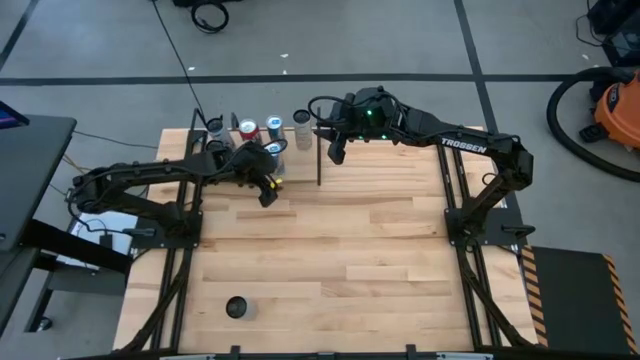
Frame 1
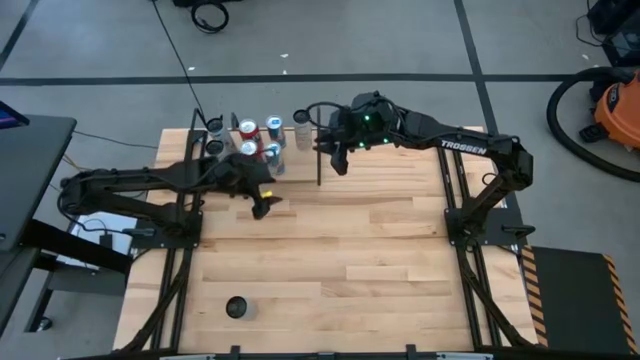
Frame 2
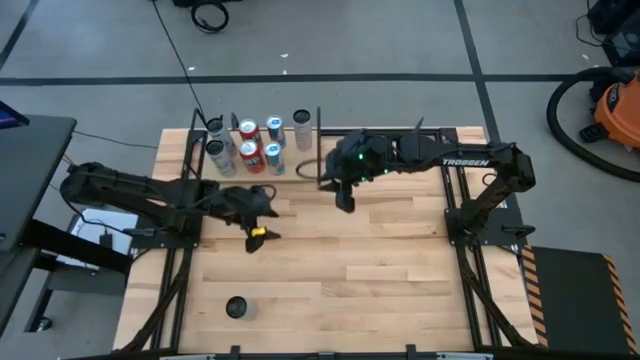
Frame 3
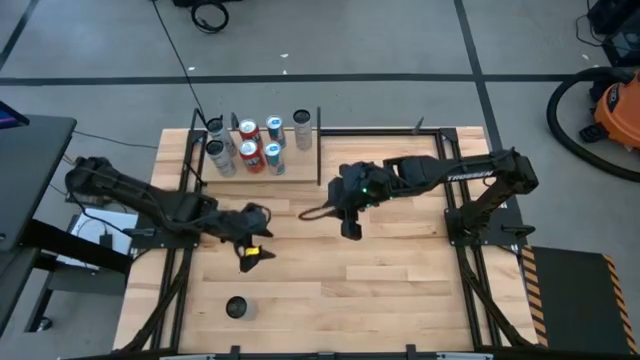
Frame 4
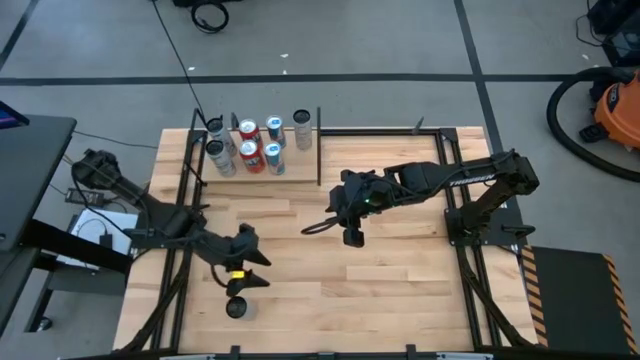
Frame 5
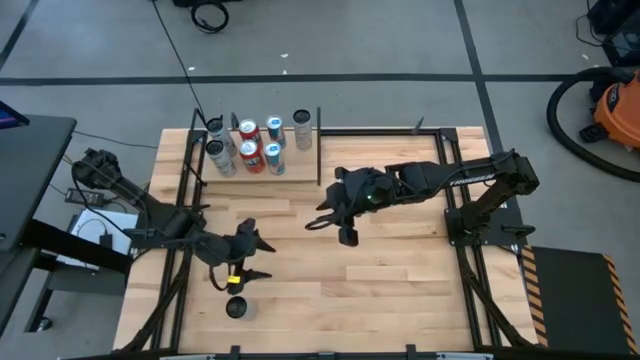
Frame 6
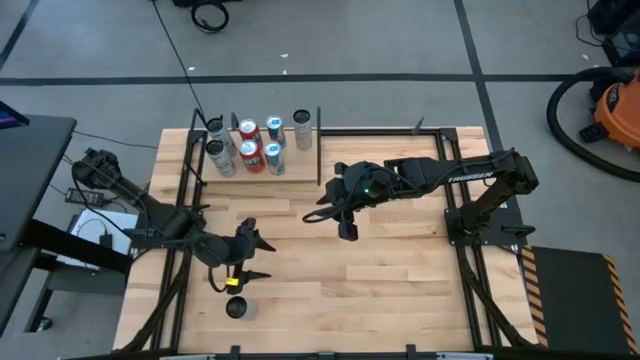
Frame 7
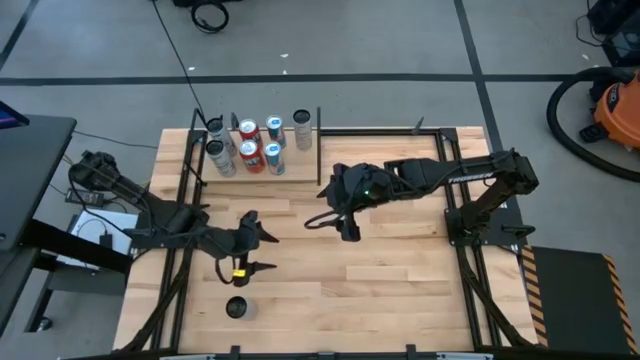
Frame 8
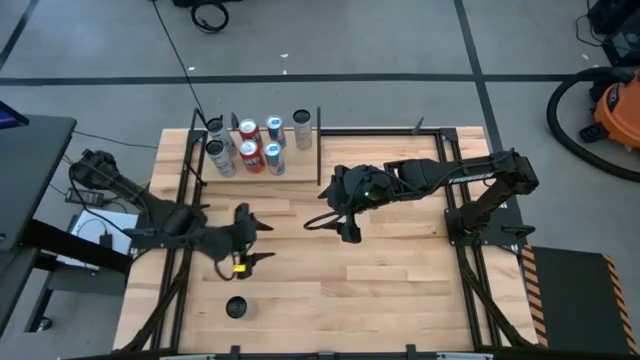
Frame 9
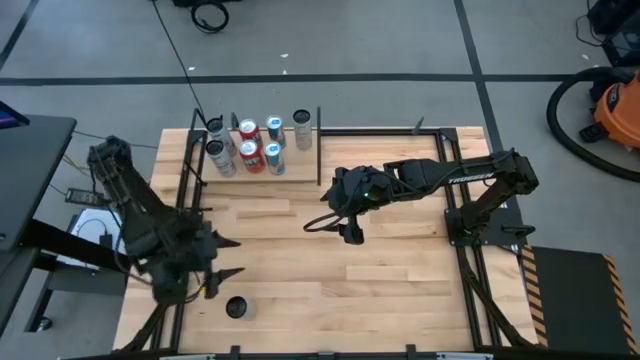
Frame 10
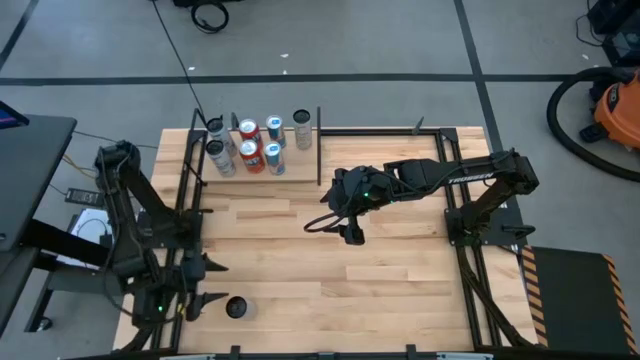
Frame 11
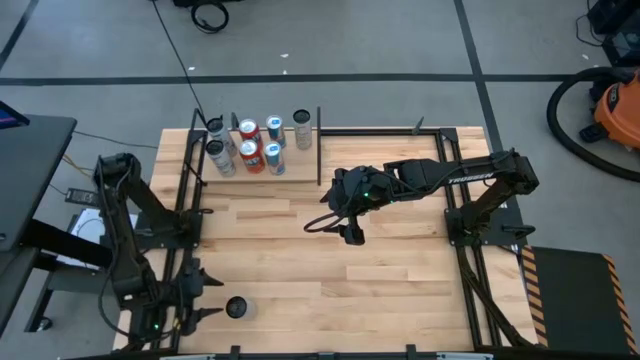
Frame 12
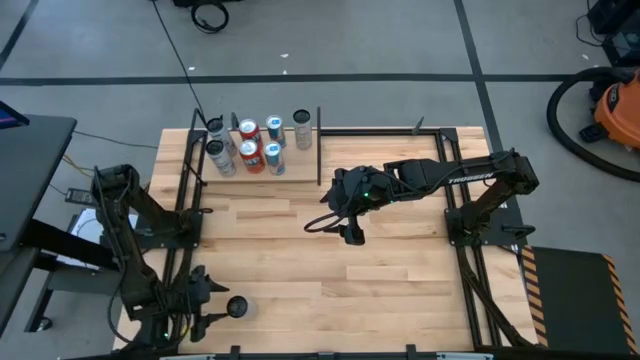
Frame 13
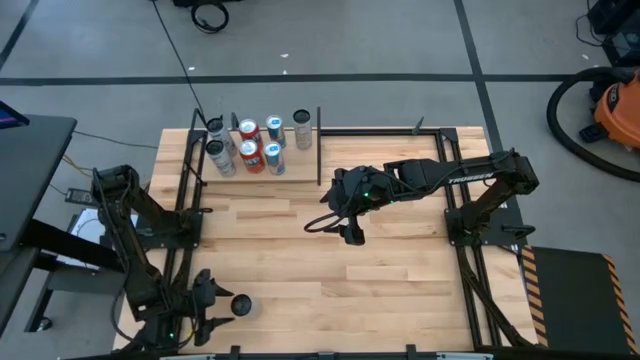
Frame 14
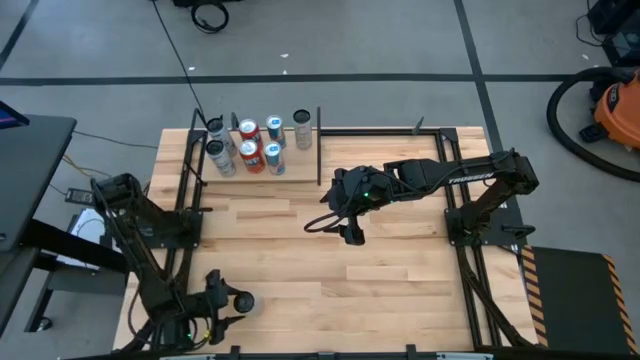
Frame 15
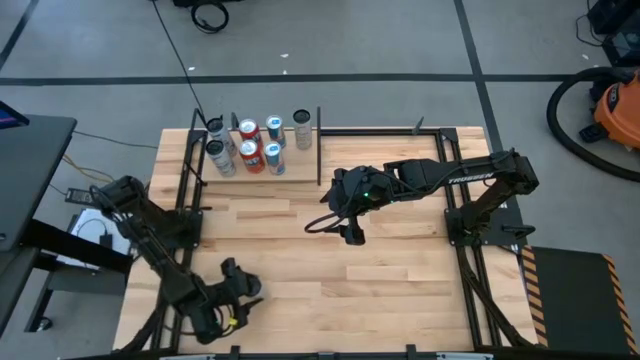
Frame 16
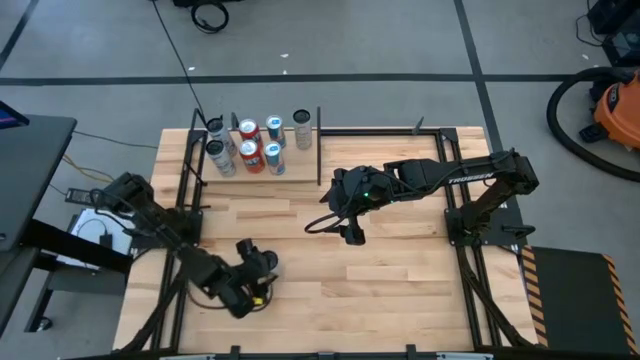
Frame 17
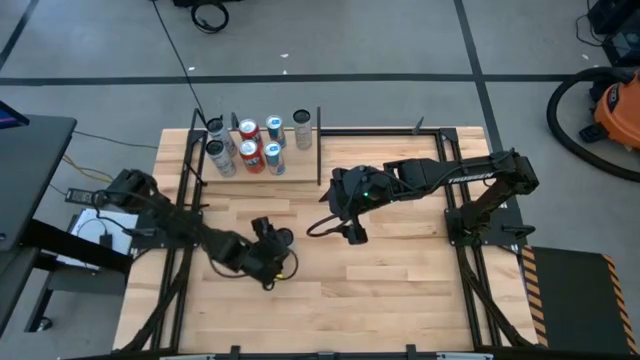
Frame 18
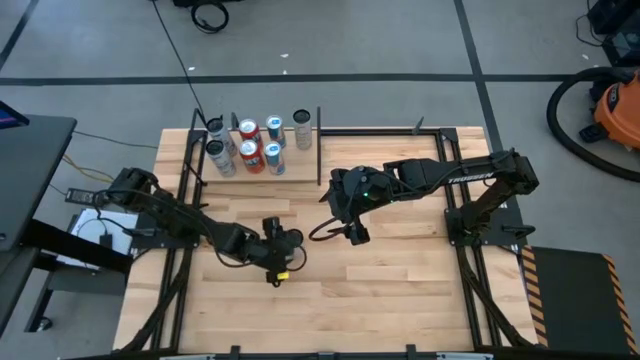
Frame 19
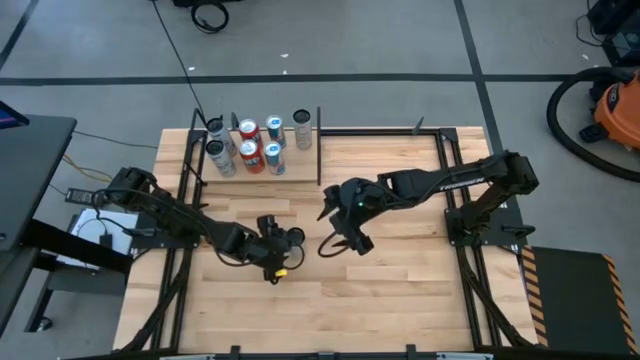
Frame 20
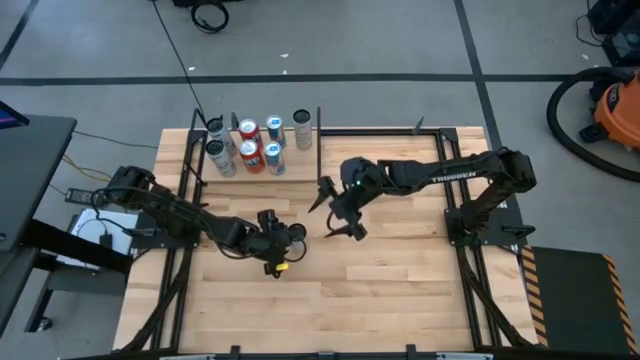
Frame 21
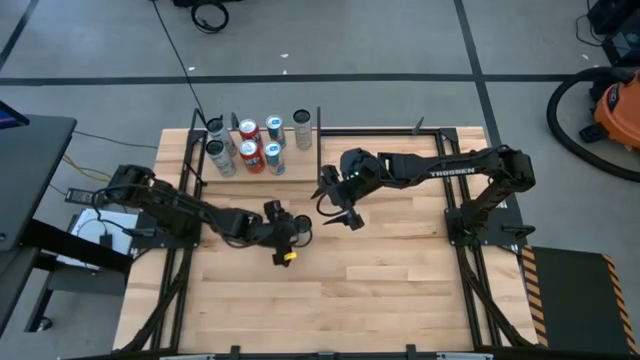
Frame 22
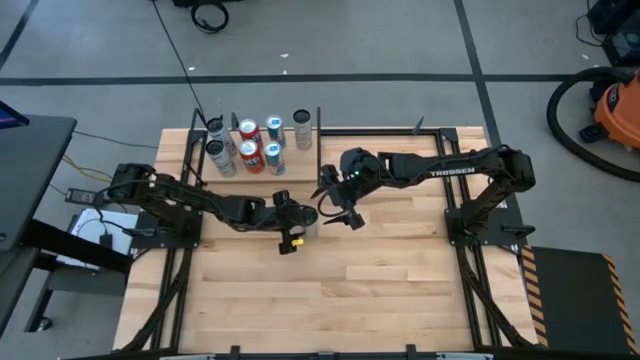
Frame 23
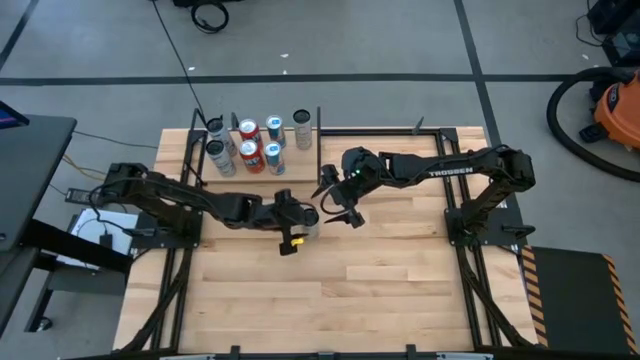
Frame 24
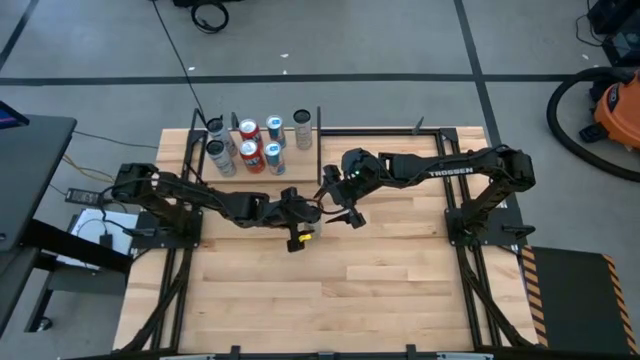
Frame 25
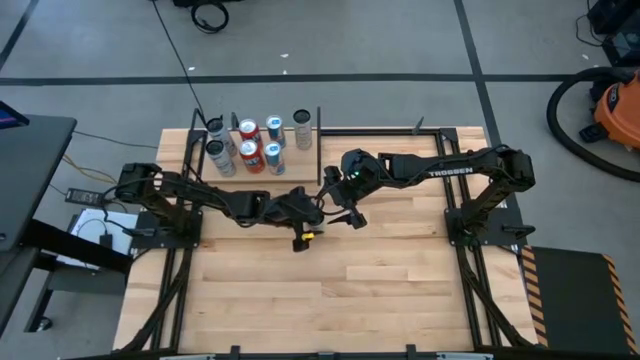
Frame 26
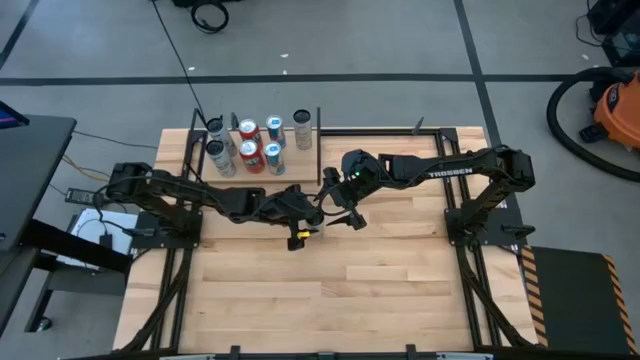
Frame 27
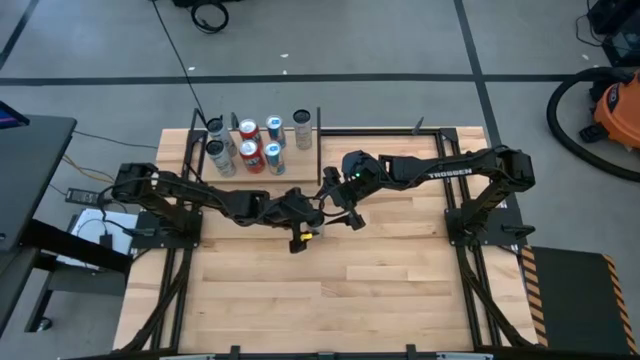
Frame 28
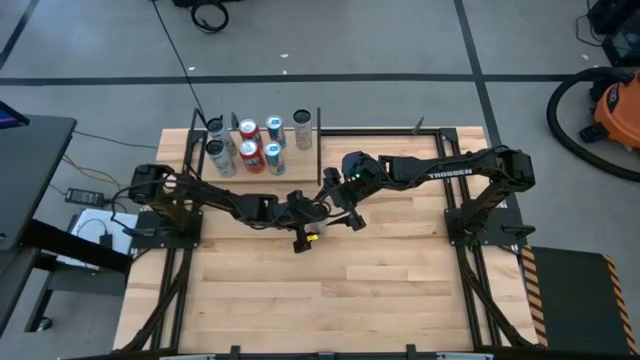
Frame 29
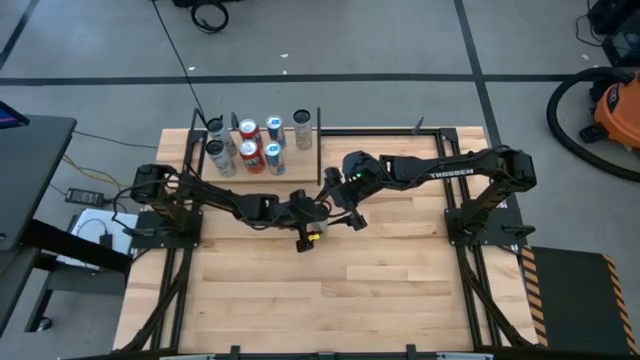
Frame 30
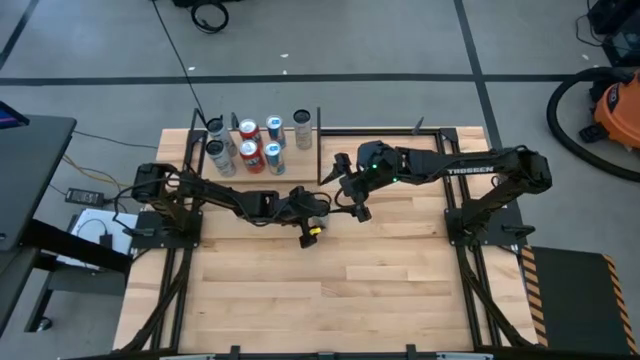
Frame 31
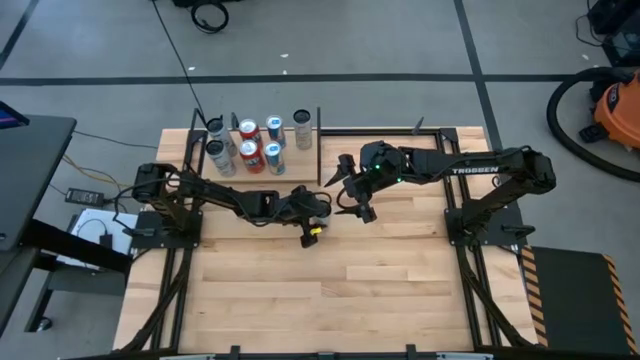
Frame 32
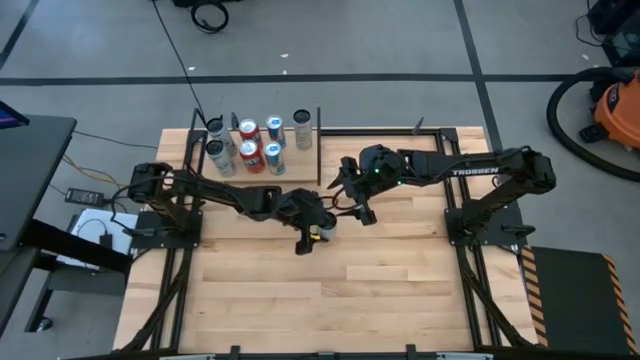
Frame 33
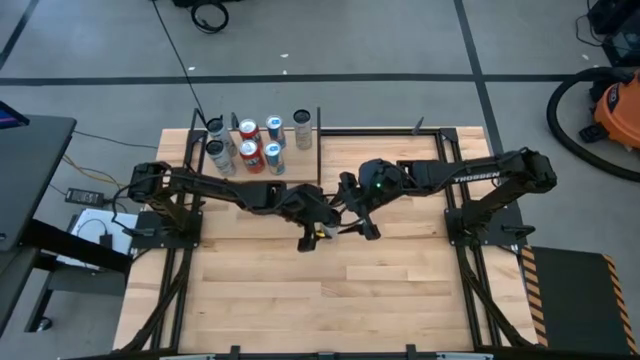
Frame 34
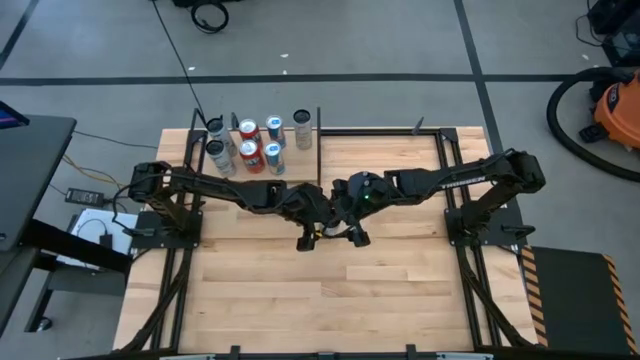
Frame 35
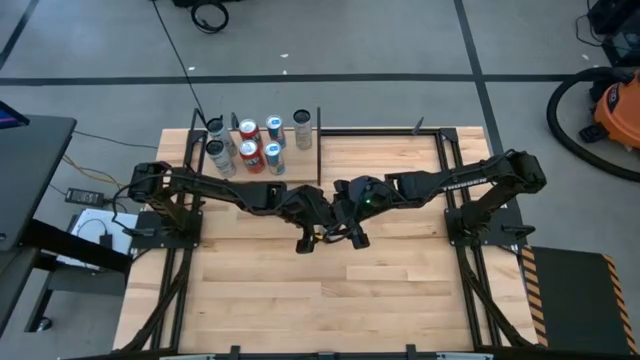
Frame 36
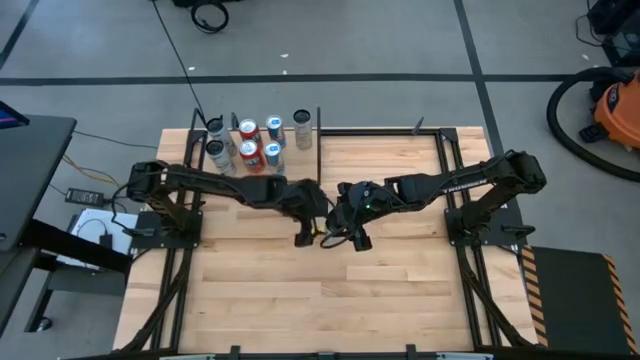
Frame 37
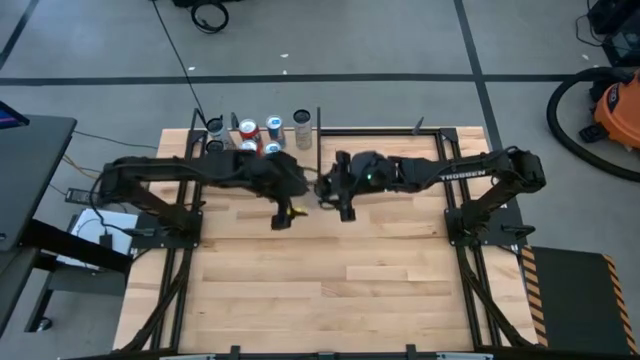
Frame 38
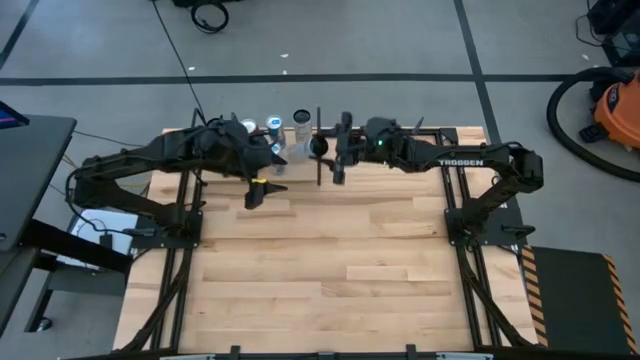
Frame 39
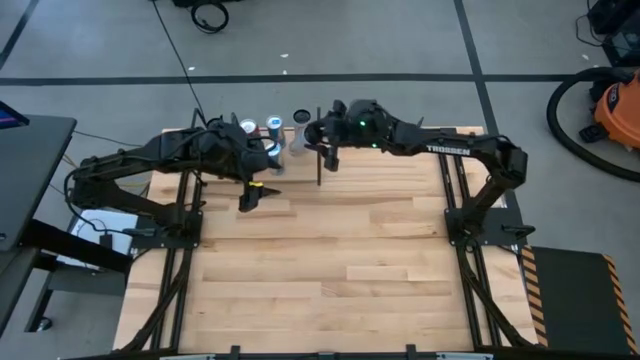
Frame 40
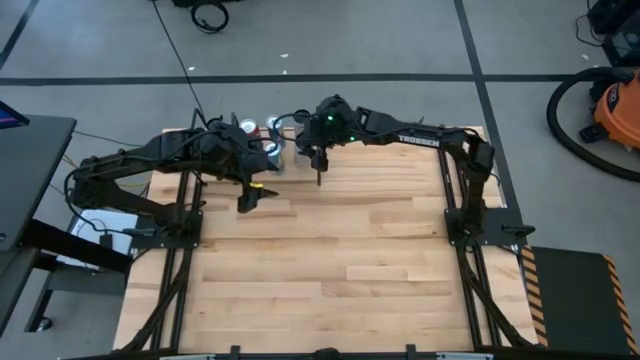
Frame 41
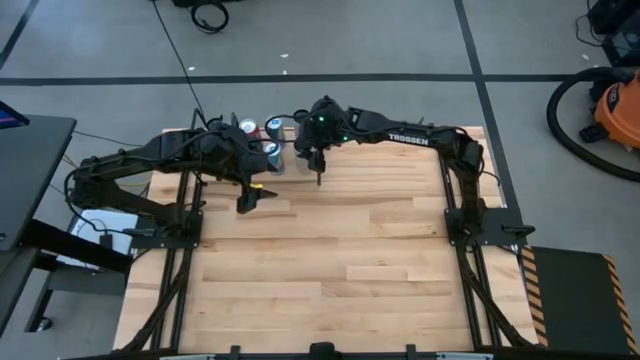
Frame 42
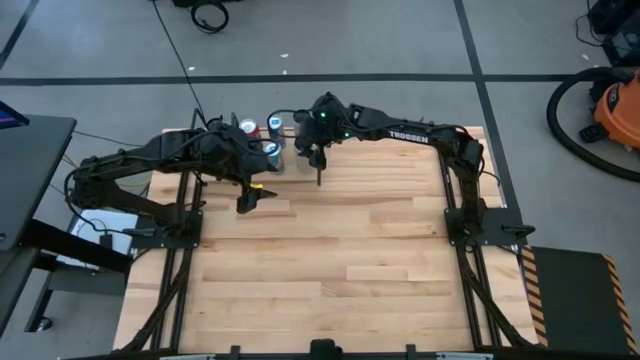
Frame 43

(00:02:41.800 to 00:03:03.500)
Task: Place canned beverage on shelf
Put the white yellow soda can aligned with the other white yellow soda can on the shelf
